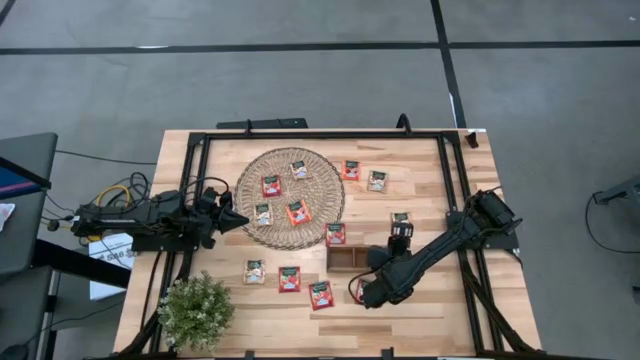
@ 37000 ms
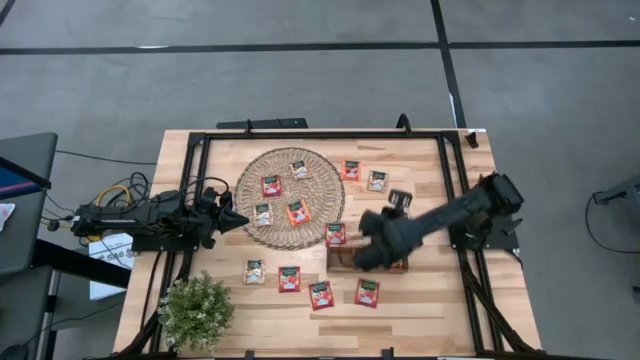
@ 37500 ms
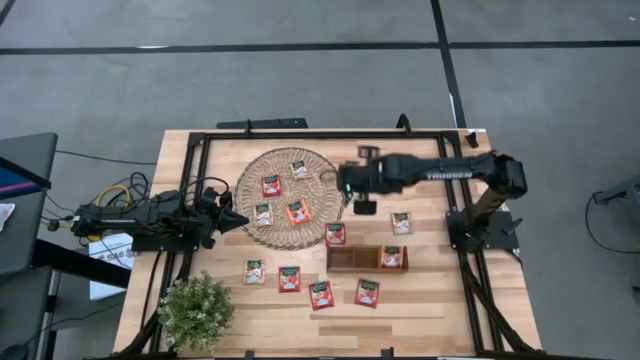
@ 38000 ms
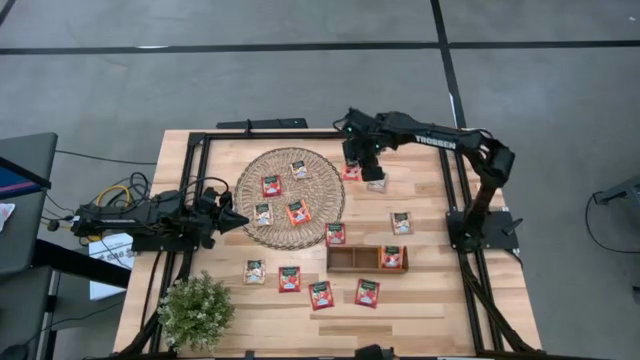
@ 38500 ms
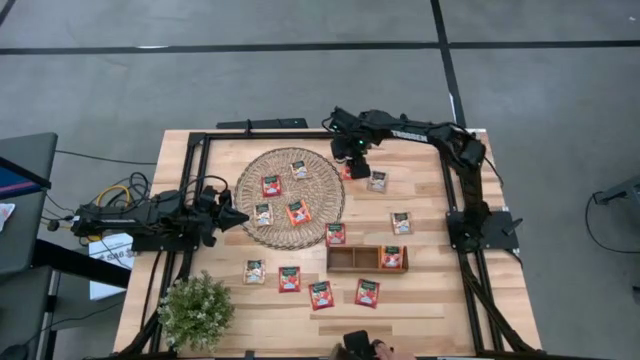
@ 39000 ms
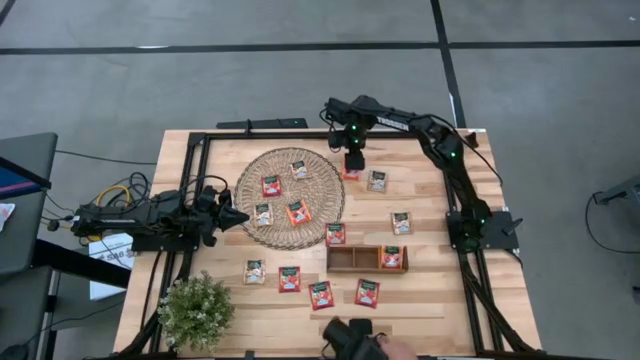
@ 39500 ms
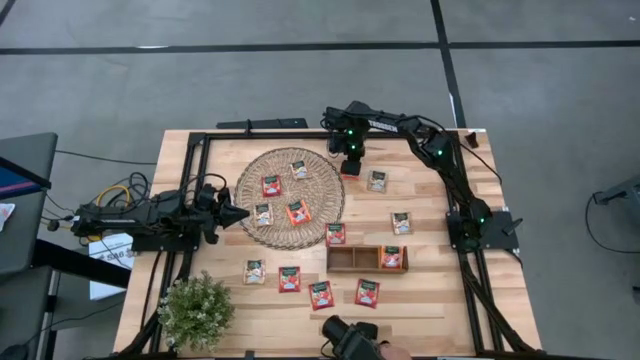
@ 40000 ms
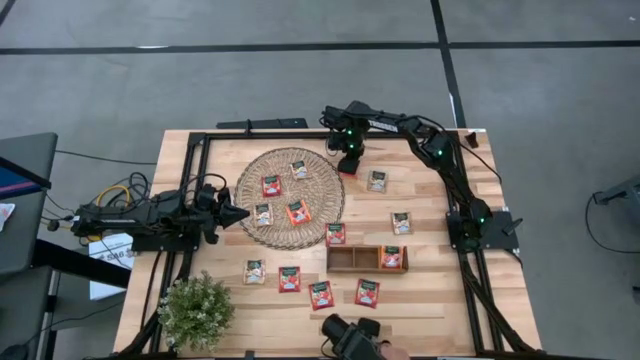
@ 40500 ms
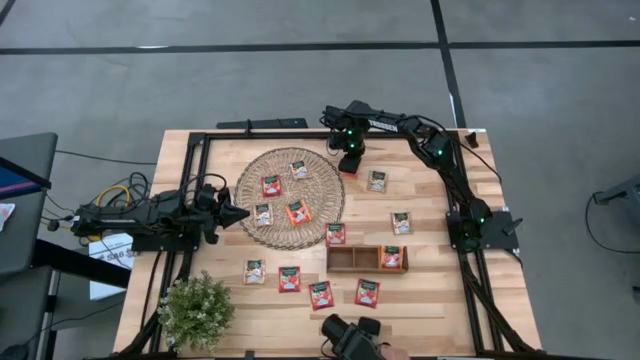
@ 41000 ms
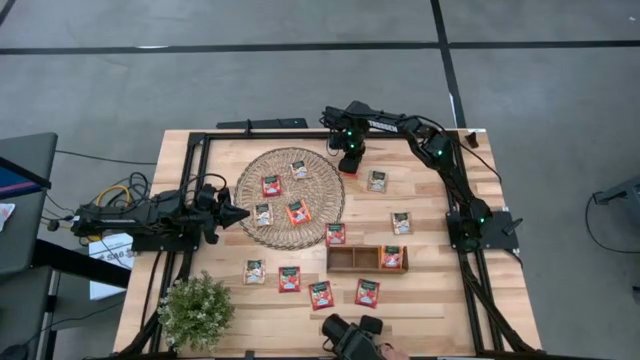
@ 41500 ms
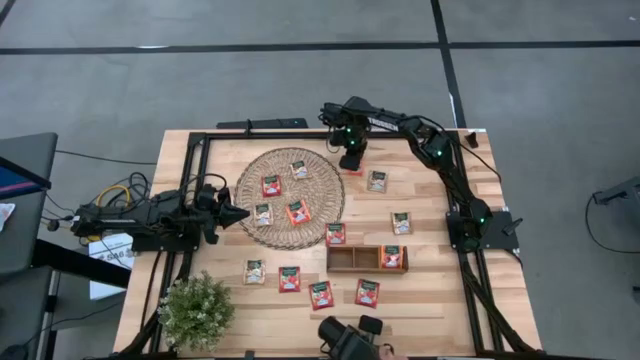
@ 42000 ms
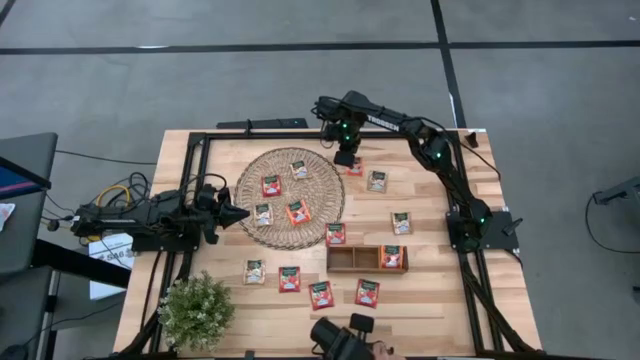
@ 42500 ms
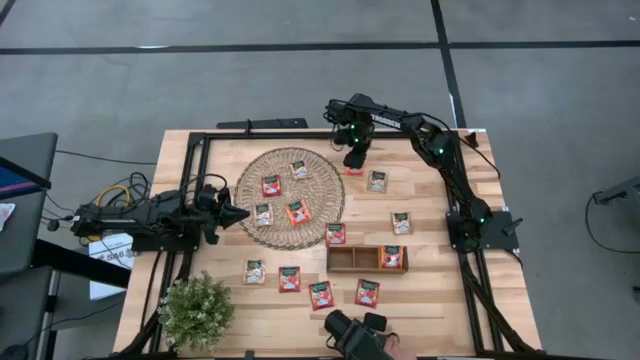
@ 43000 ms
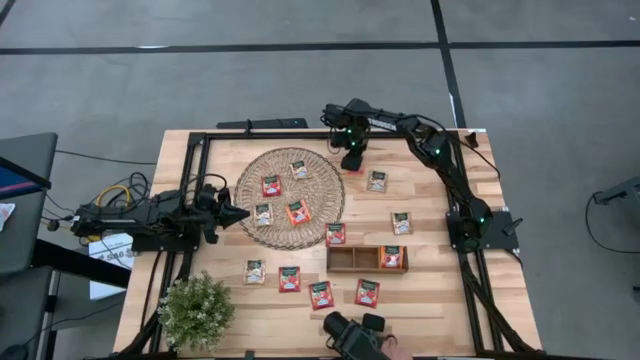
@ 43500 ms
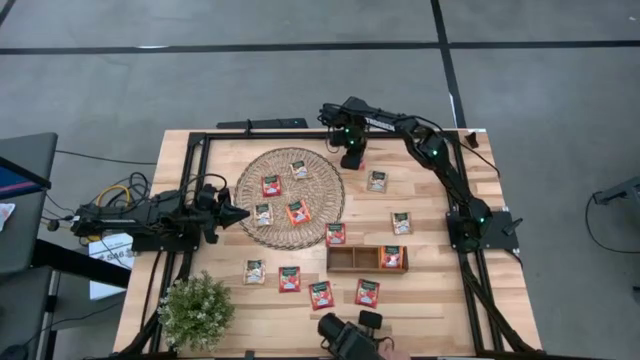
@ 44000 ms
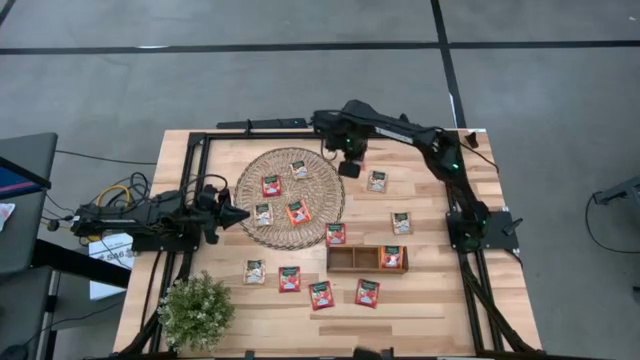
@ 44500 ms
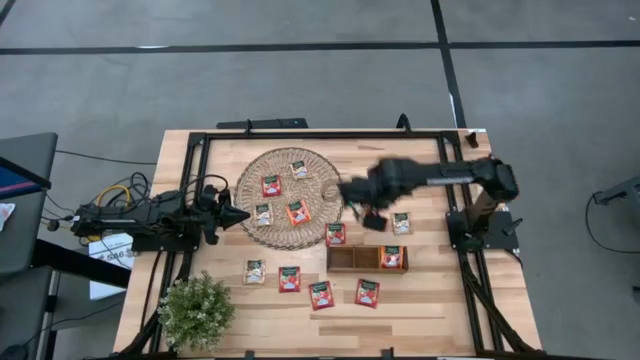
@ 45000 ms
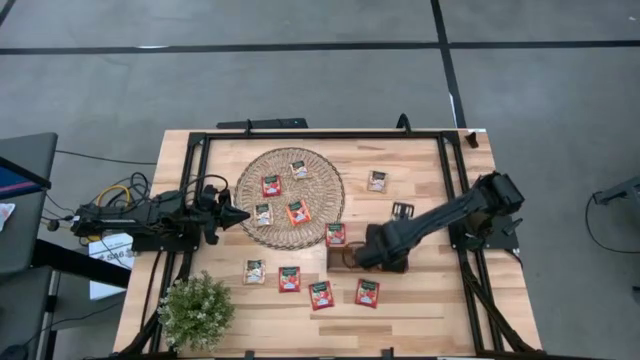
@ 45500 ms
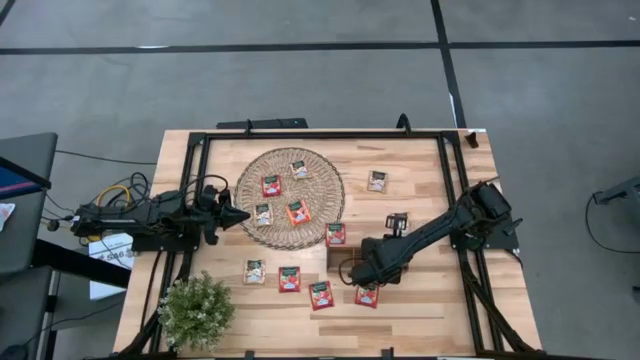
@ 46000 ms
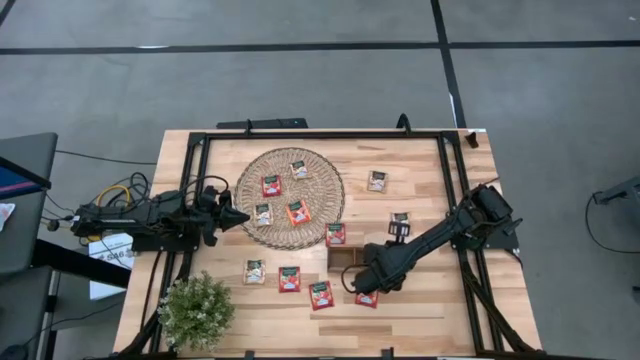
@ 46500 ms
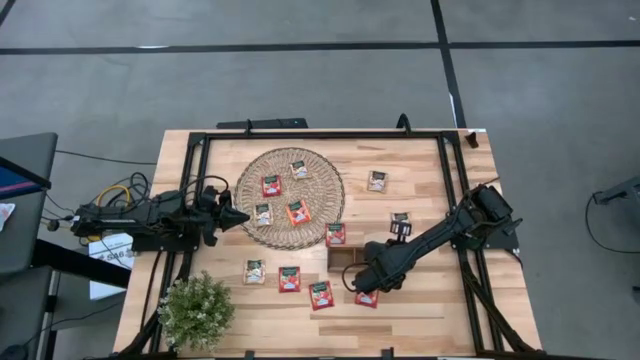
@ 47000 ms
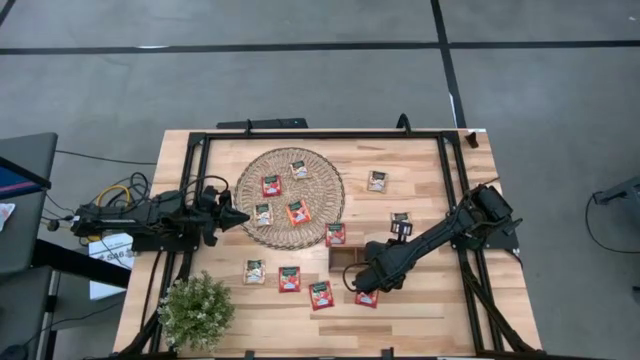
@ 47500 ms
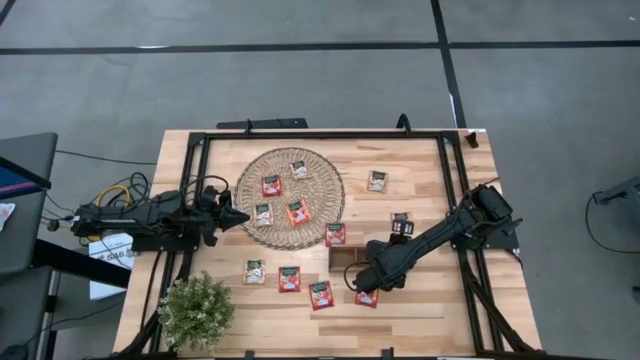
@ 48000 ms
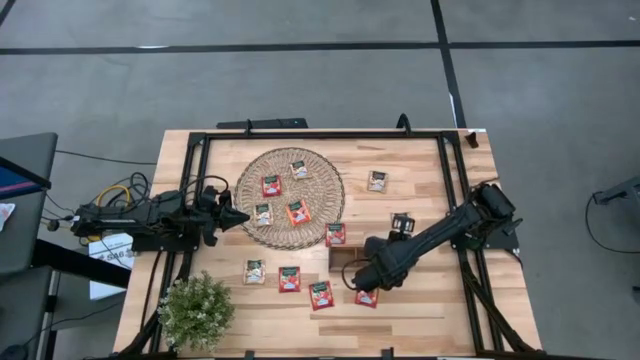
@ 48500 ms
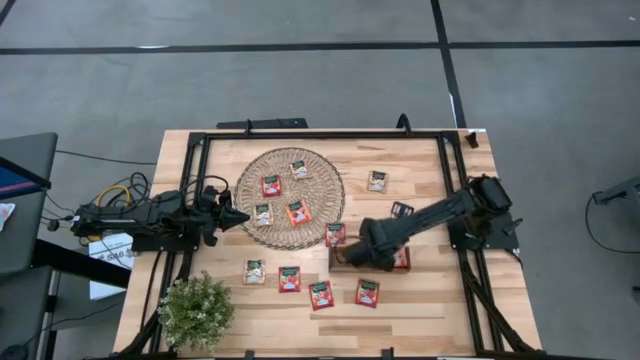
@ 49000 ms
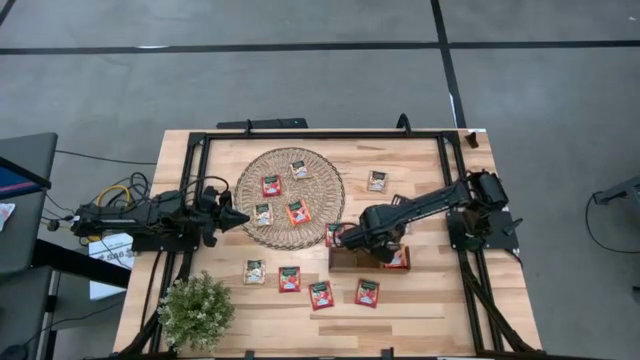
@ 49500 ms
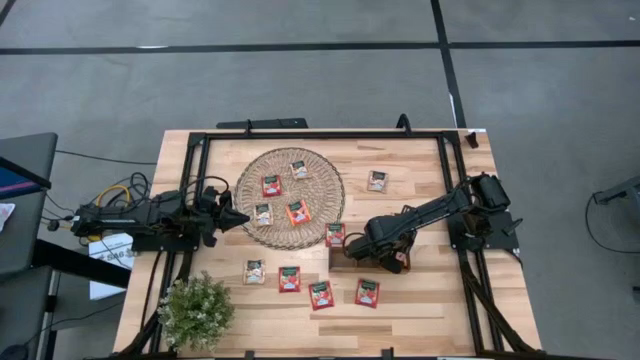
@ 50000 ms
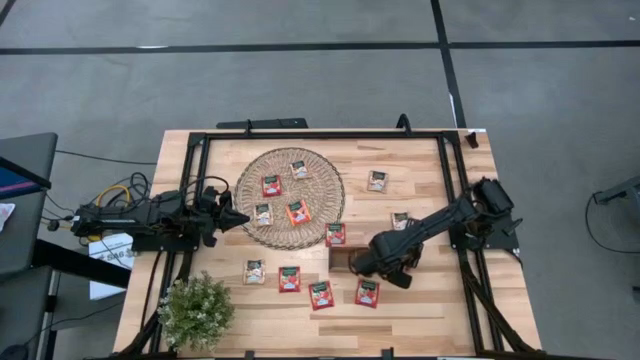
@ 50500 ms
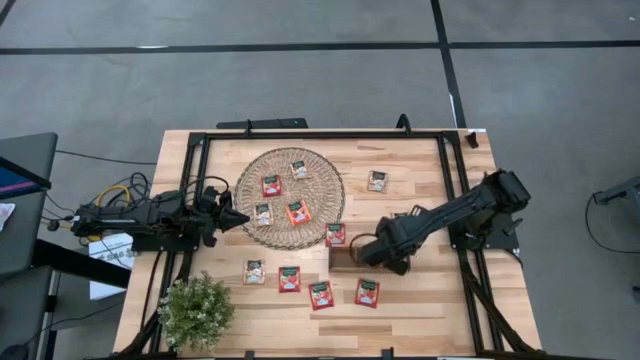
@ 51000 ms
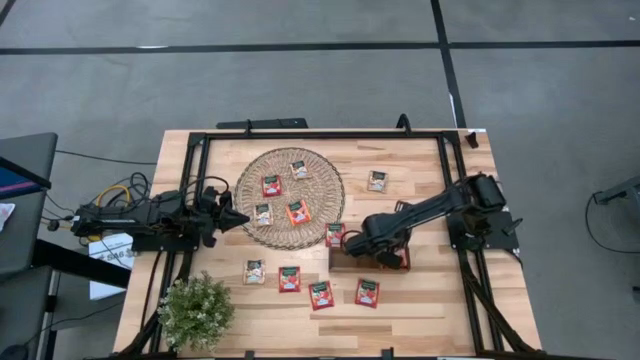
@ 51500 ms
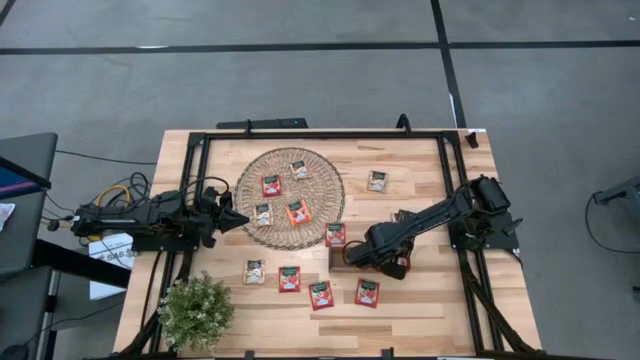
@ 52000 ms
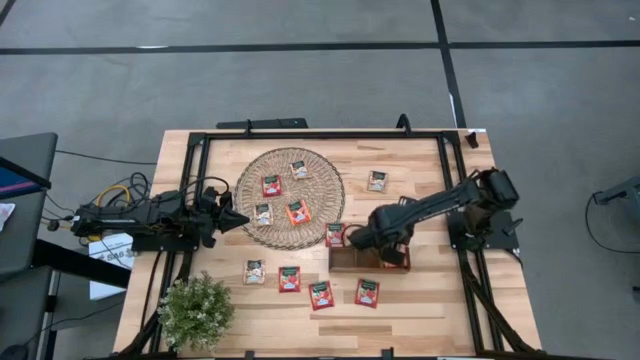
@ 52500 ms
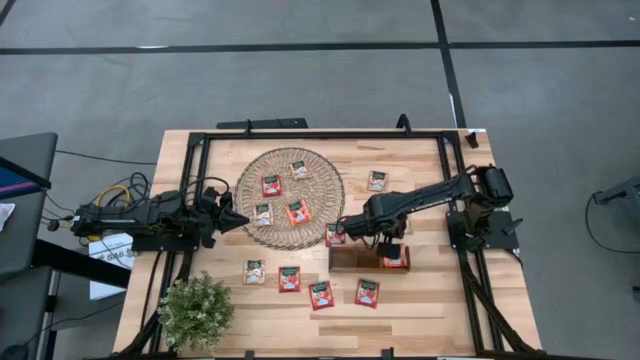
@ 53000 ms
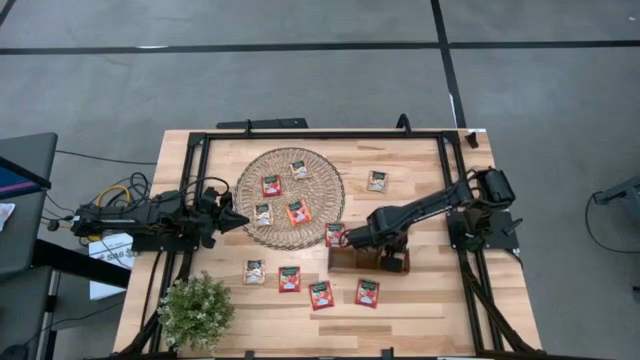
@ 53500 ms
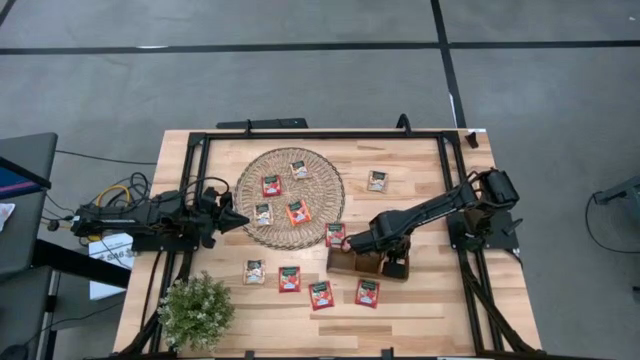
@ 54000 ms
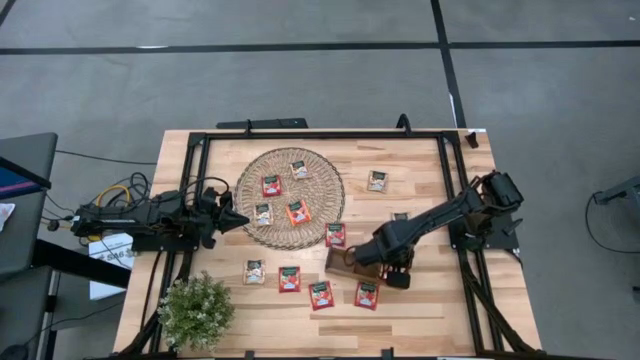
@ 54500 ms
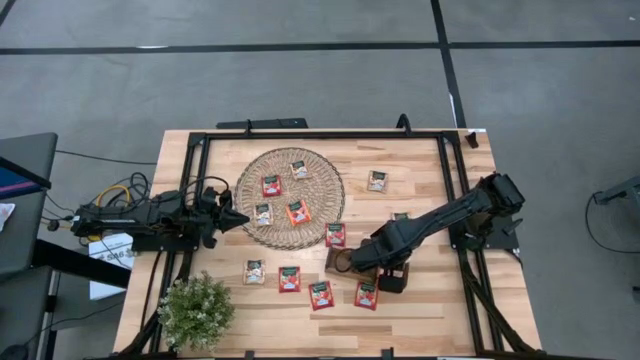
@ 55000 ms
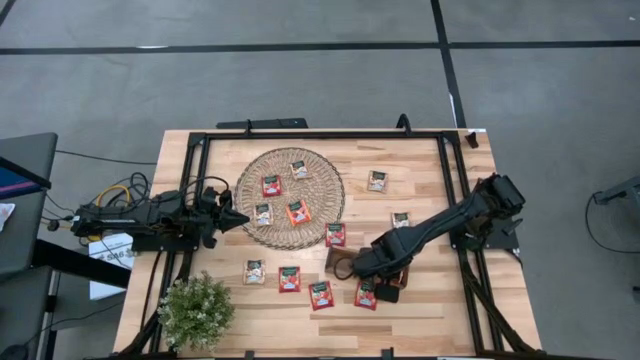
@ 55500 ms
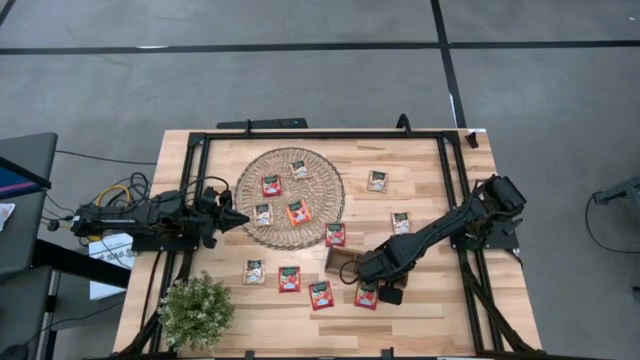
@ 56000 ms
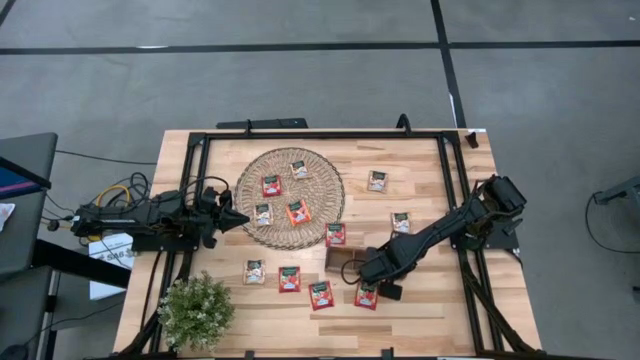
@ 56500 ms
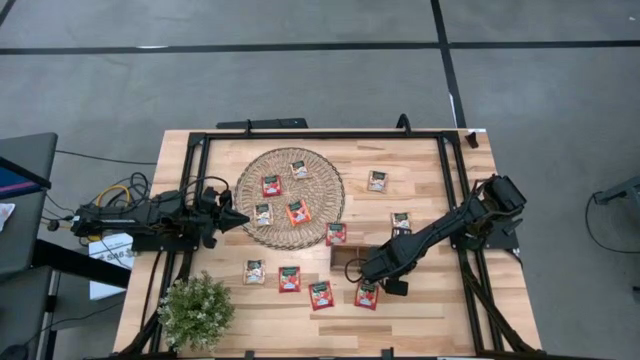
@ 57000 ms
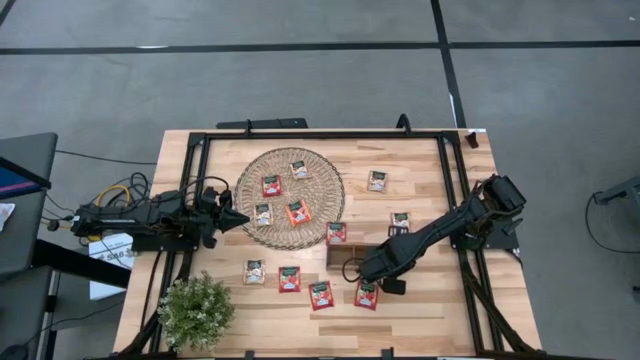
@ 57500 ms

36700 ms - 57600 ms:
Task: Pick & Place Tea
Put the orange tea bag into the right section of the wooden organizer
